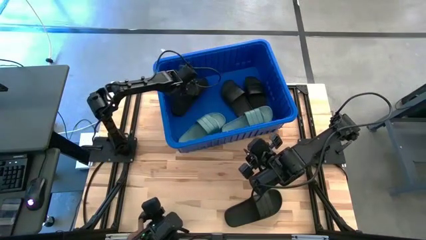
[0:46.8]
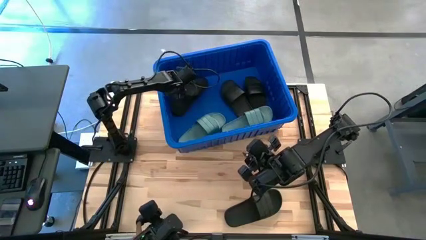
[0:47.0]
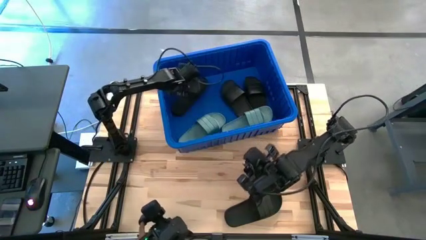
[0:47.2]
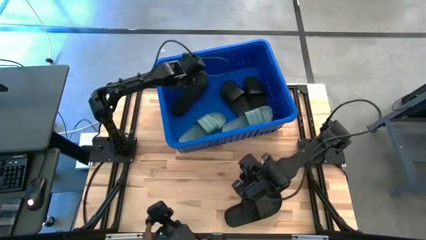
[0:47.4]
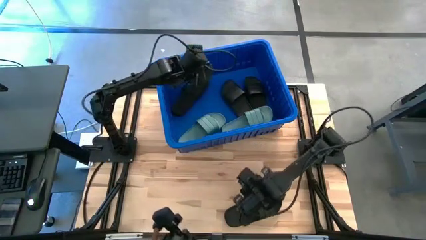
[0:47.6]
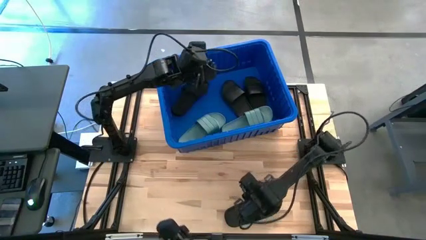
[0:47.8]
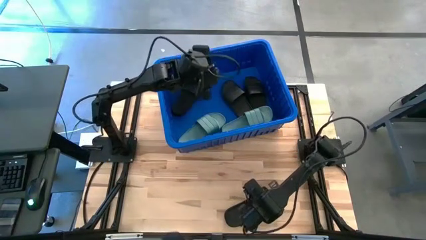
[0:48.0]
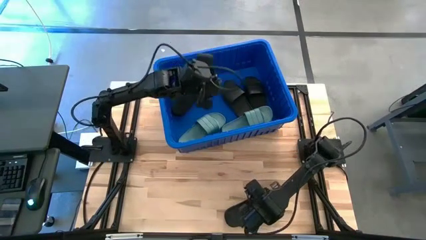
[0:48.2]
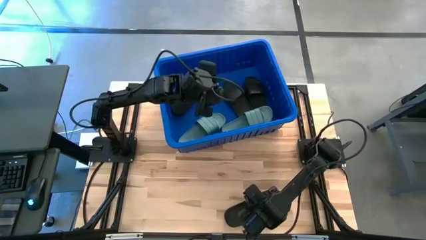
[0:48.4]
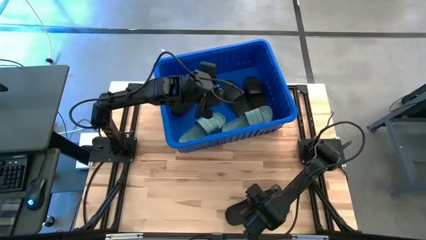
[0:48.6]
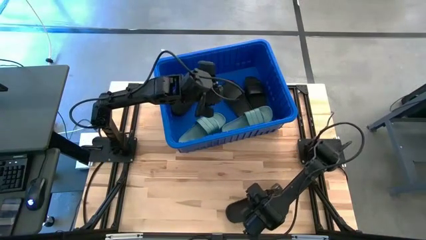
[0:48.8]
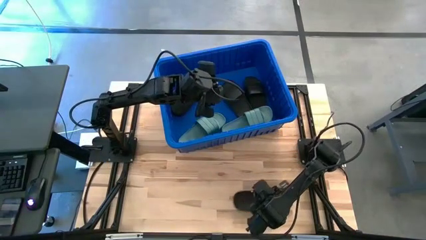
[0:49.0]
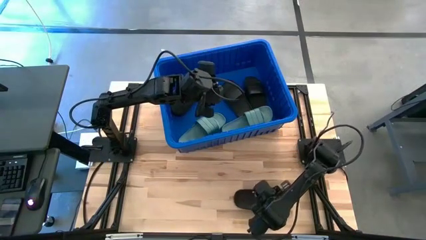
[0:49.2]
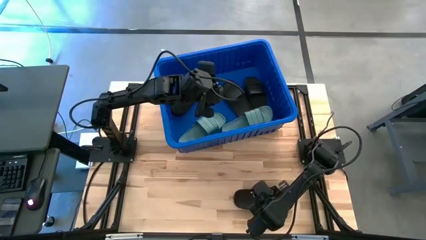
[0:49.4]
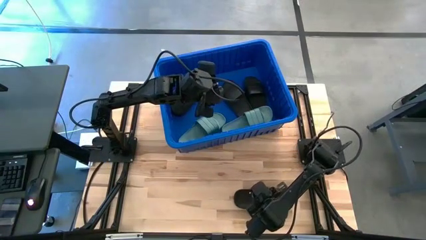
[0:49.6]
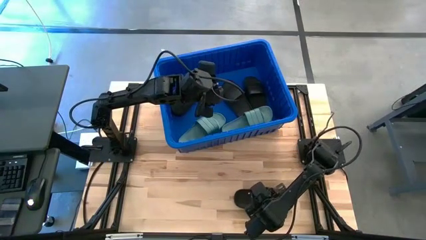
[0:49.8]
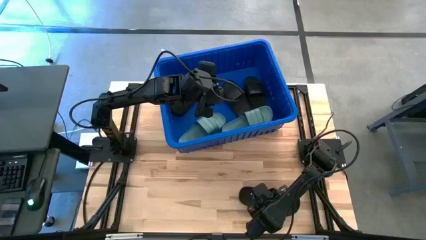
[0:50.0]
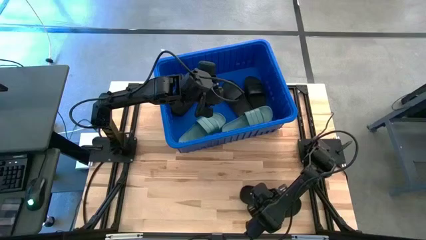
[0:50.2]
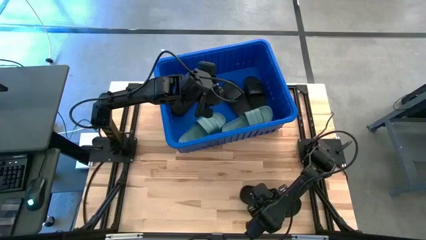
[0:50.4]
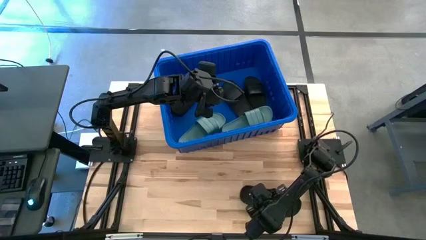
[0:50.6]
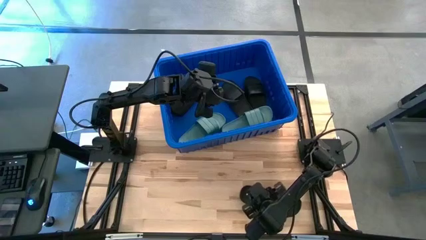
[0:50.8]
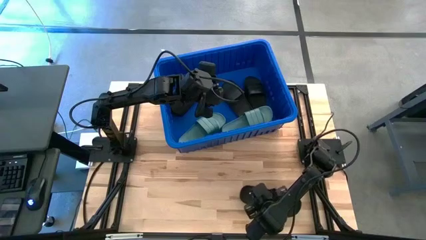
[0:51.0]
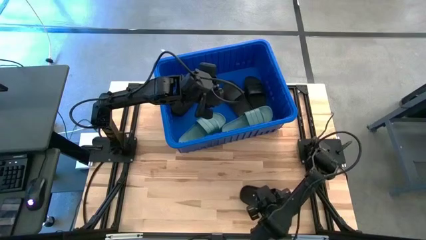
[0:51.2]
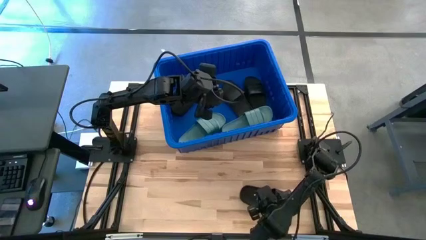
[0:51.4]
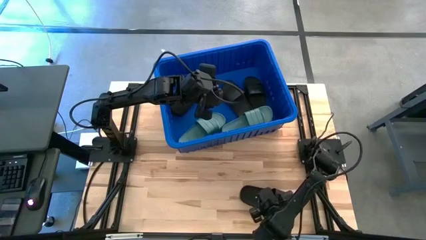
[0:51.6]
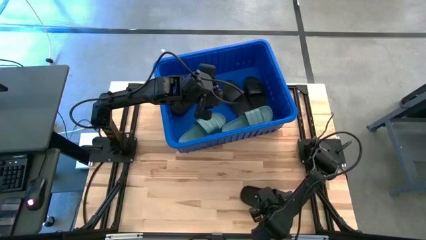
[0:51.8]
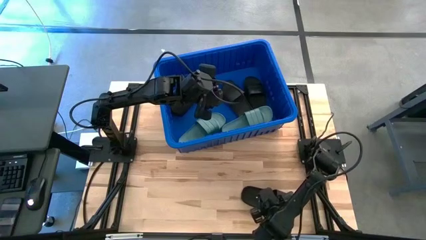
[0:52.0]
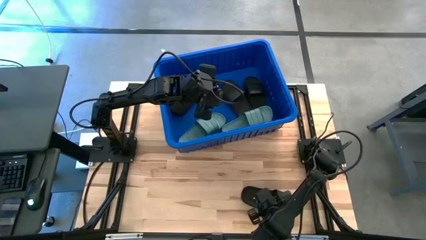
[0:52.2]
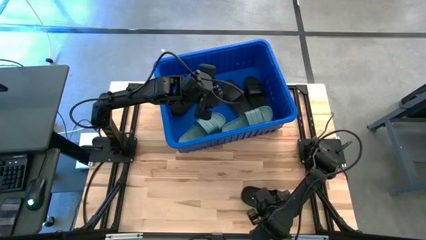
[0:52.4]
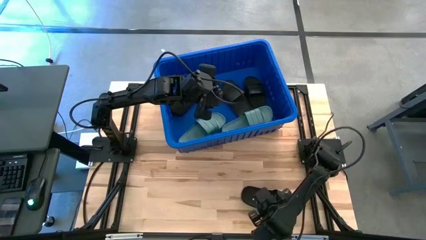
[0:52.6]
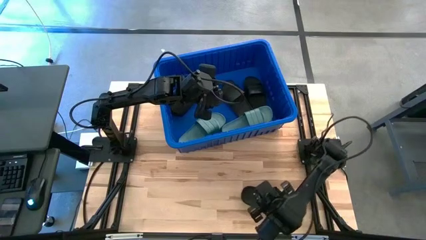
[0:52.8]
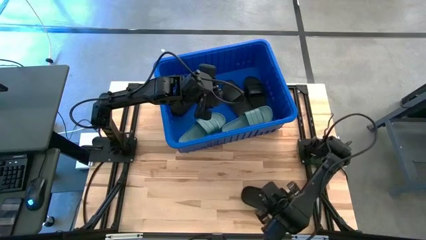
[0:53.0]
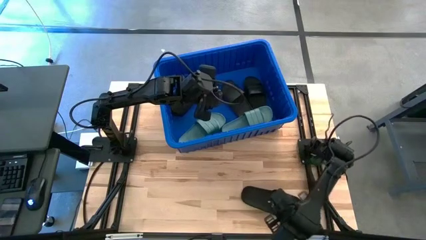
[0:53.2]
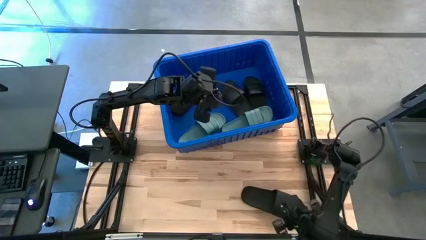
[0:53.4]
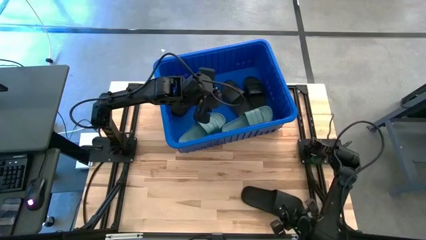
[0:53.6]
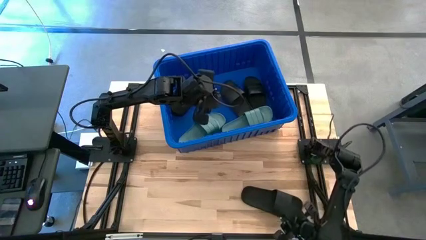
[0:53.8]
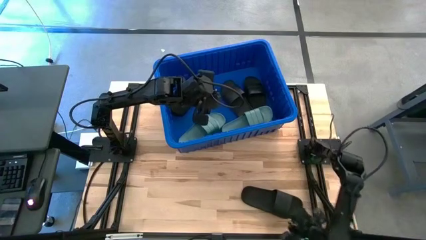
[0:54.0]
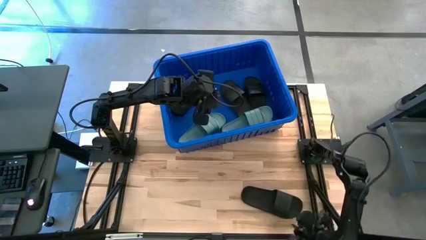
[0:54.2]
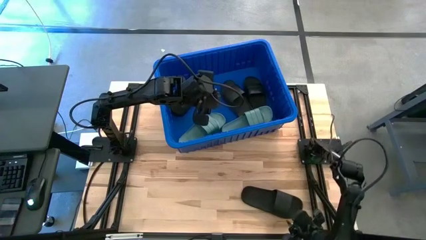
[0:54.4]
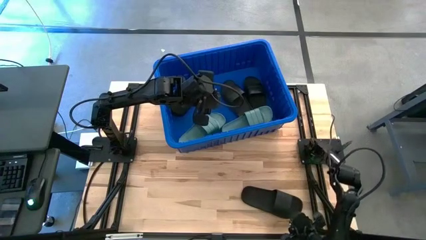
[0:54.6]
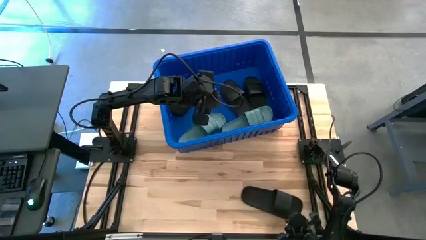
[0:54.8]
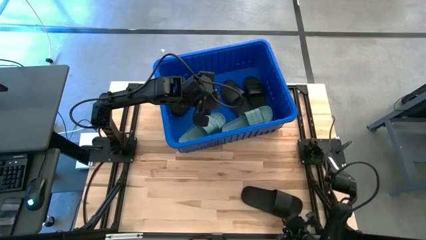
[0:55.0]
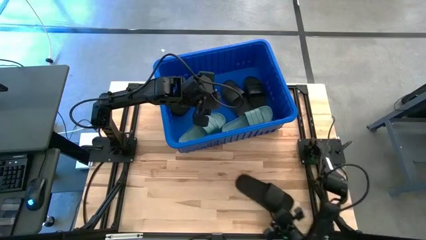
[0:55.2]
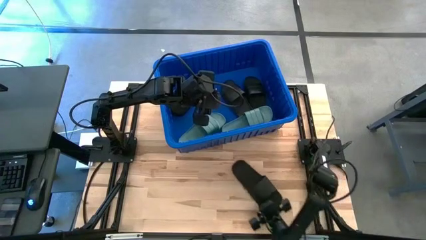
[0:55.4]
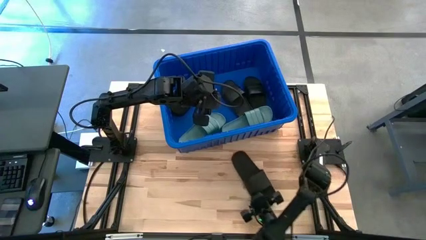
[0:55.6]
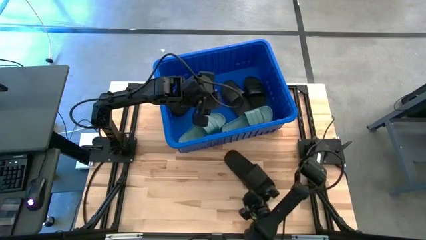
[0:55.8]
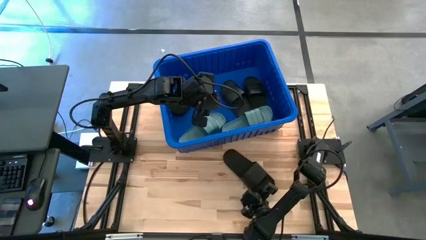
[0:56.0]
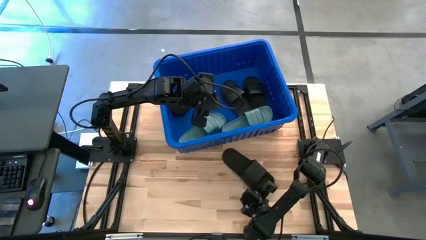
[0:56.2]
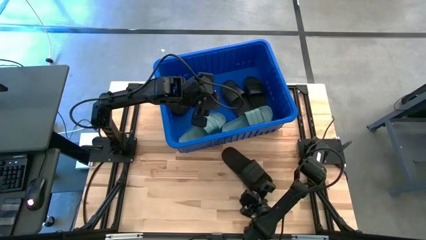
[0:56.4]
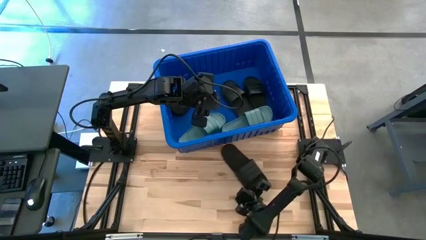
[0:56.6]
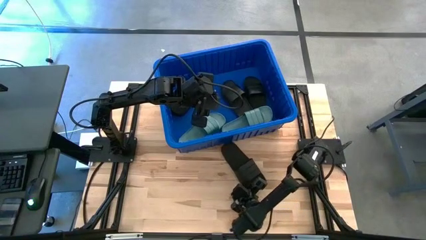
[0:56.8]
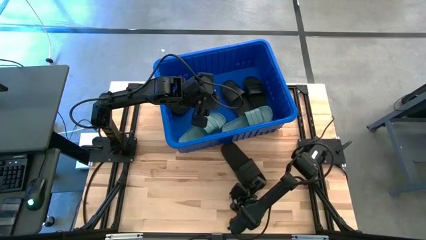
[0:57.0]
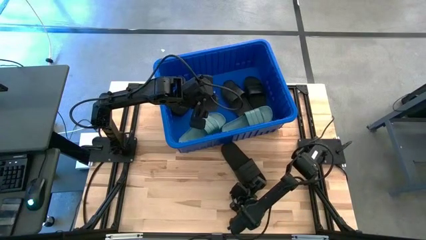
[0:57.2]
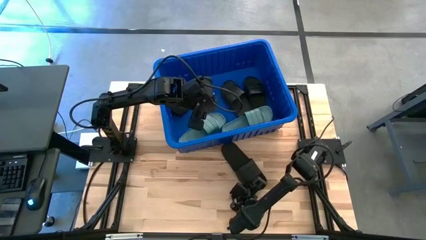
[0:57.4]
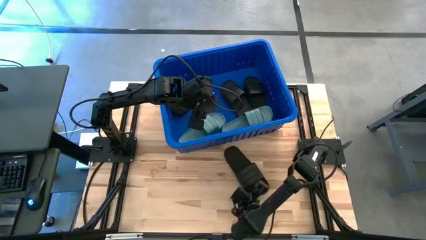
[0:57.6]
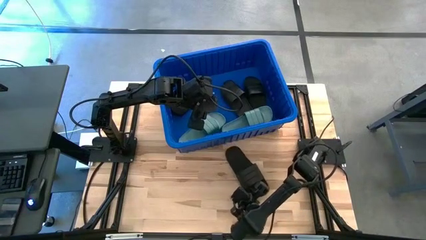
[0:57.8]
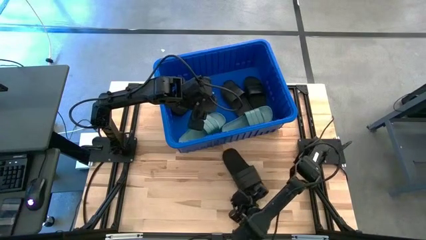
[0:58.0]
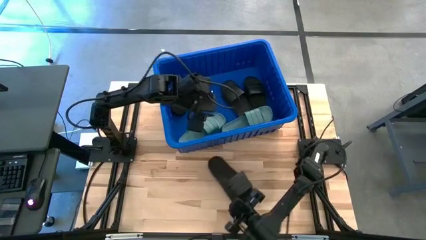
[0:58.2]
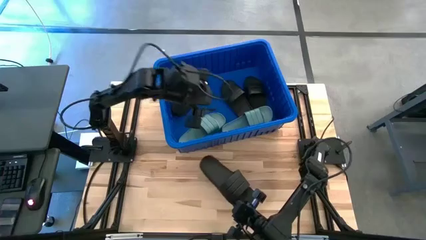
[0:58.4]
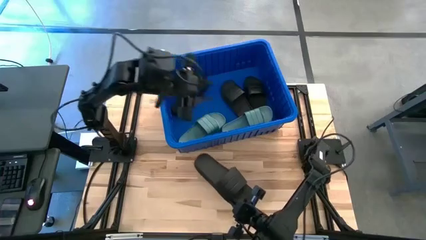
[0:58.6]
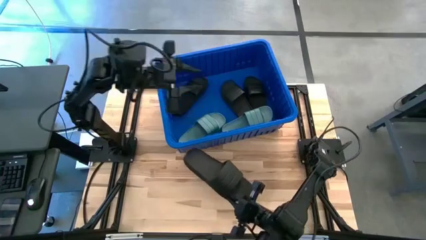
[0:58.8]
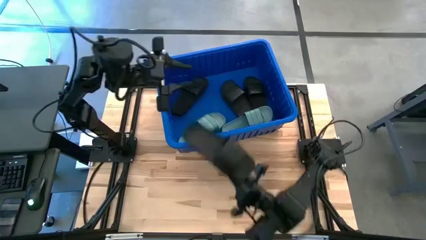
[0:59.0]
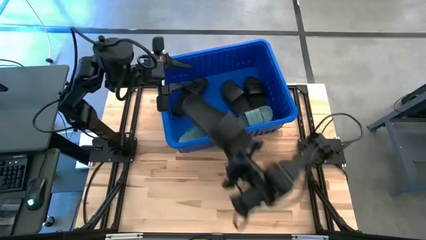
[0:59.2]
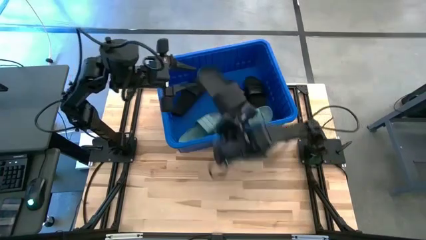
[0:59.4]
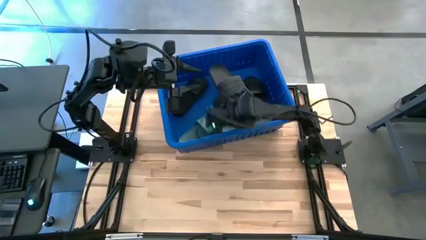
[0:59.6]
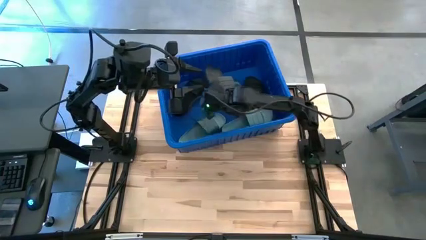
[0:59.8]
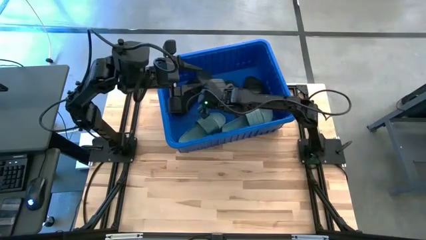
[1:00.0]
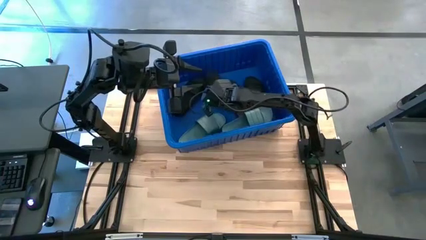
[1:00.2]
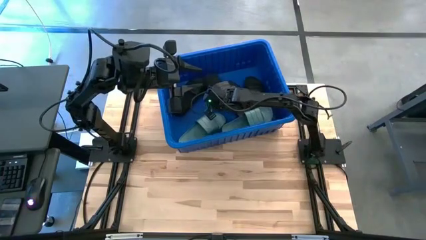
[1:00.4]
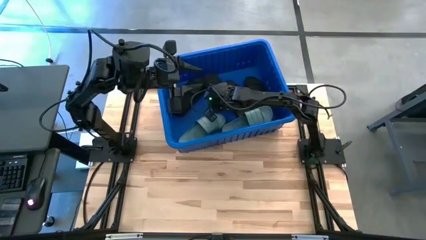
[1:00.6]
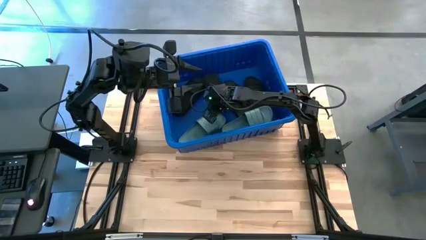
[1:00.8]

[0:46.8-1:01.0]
Task: Pick and place slides into bin
Put the black slide into the blue bin

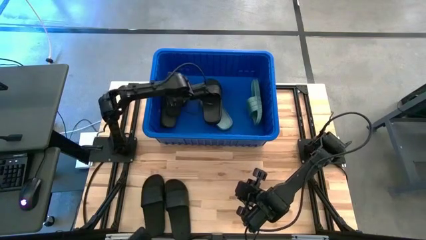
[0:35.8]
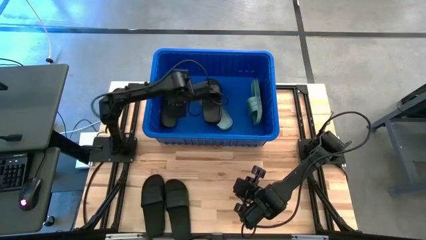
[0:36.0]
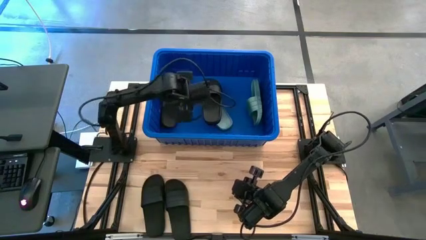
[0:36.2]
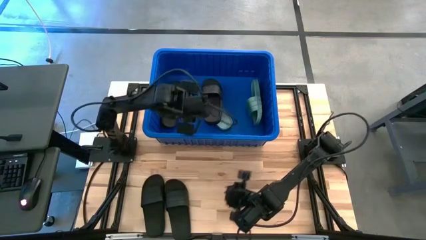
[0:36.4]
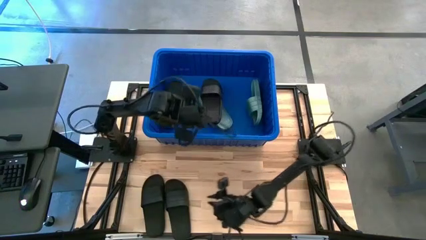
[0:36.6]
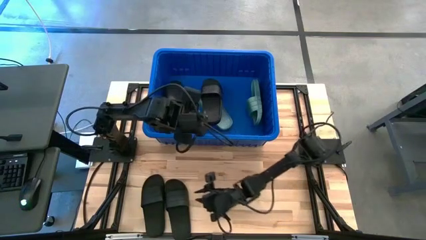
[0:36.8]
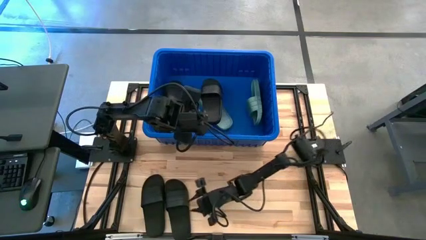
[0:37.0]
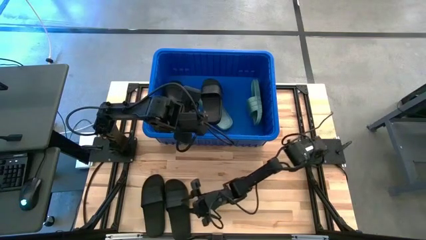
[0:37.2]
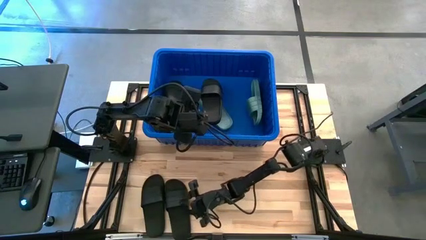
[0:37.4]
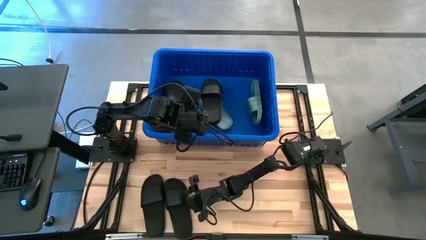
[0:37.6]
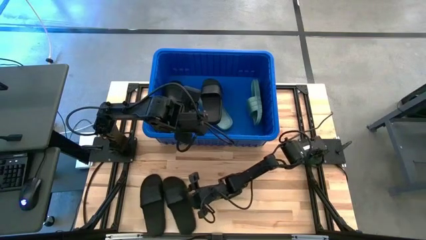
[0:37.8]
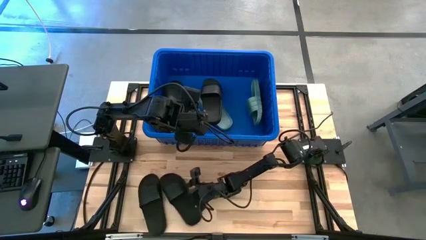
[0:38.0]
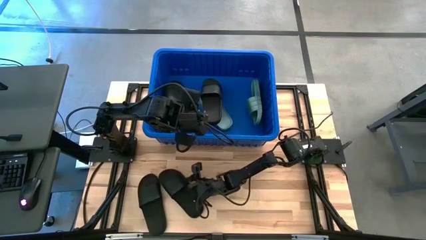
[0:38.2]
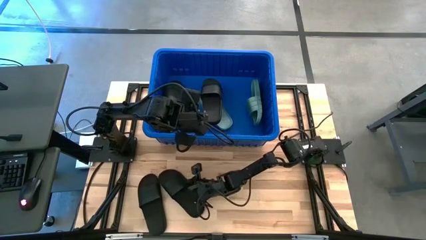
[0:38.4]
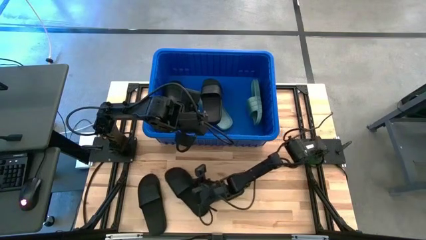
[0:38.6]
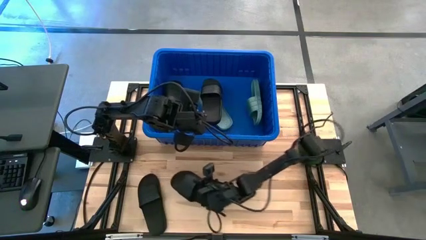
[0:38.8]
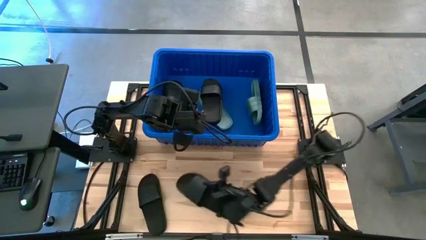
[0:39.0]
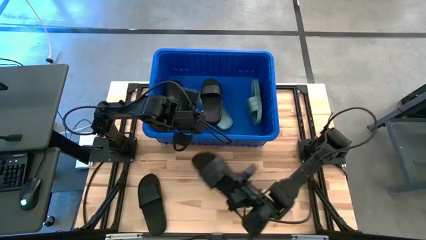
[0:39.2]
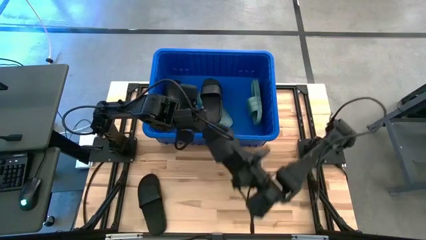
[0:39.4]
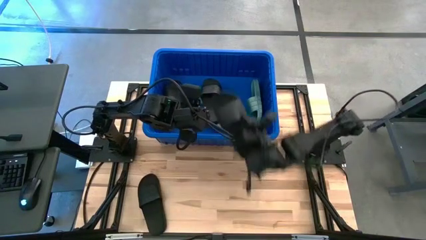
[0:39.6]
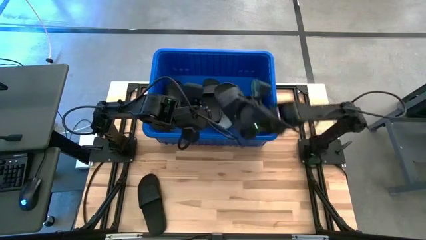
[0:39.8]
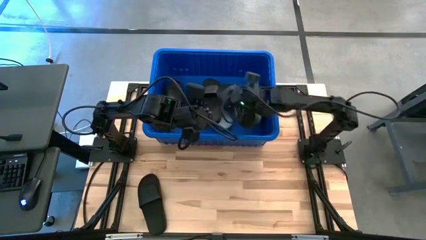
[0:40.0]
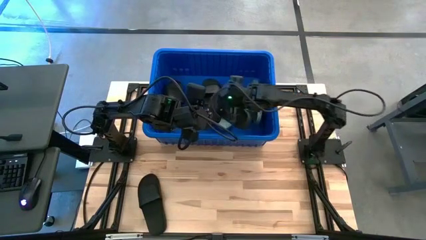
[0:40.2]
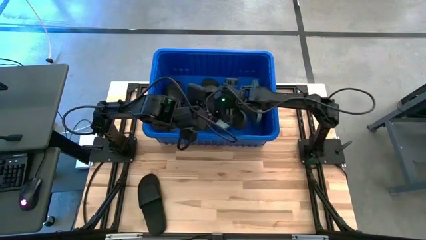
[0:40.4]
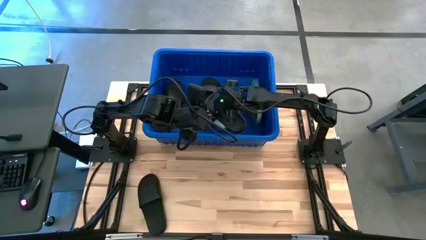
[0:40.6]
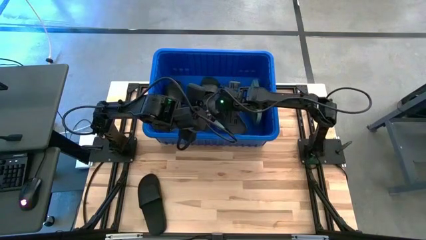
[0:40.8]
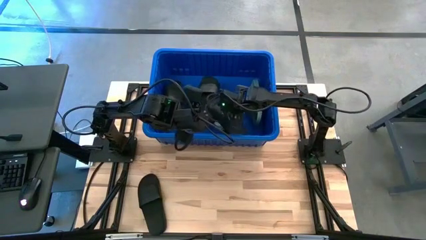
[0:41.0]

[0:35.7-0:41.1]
Task: Pick and place slides into bin
Put the black slide into the blue bin
